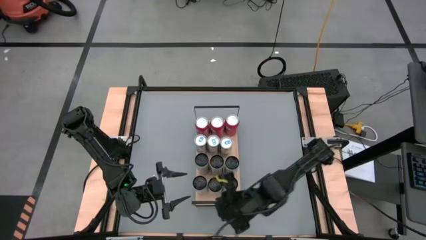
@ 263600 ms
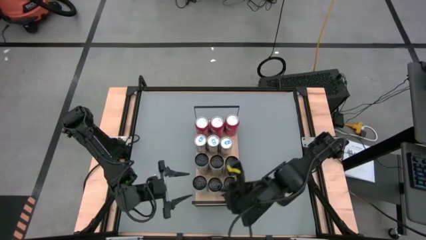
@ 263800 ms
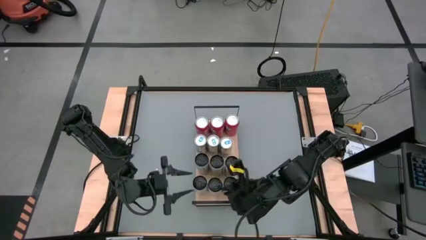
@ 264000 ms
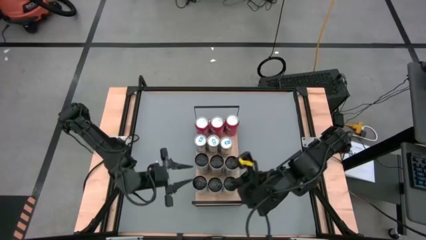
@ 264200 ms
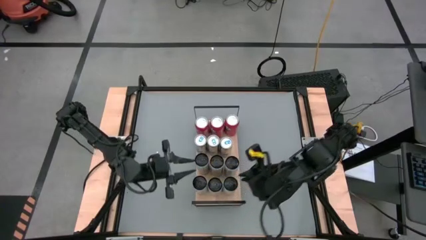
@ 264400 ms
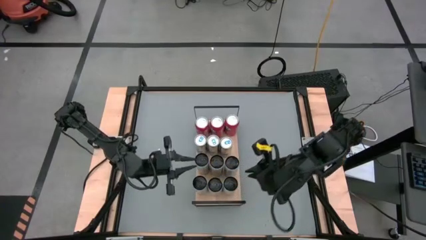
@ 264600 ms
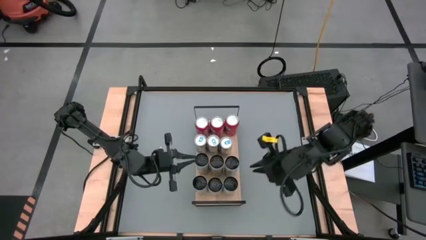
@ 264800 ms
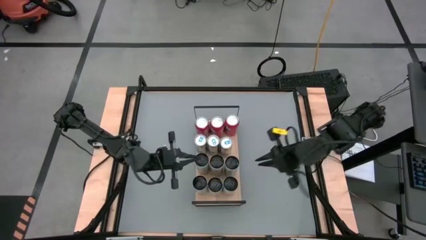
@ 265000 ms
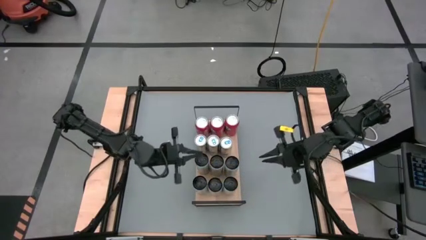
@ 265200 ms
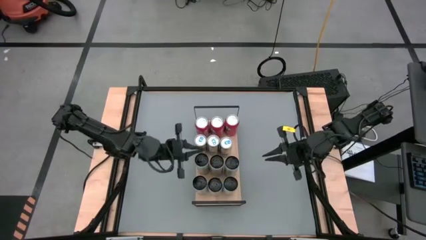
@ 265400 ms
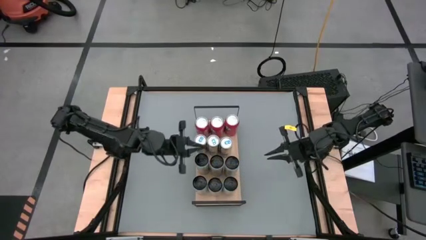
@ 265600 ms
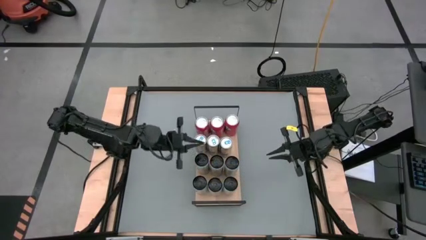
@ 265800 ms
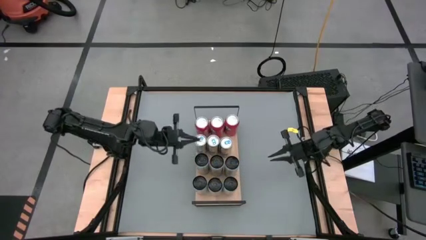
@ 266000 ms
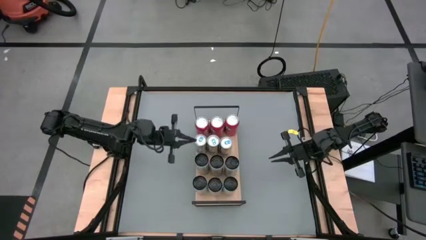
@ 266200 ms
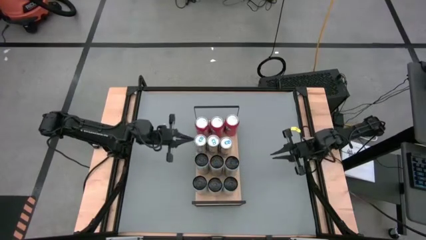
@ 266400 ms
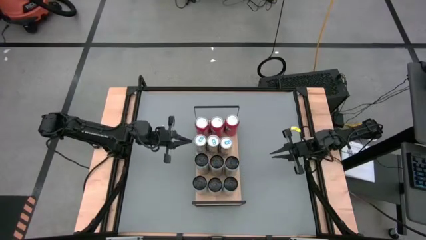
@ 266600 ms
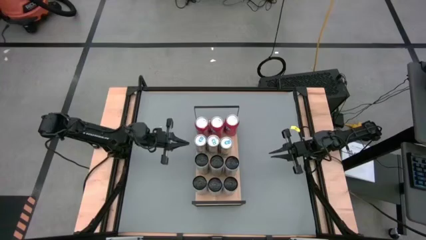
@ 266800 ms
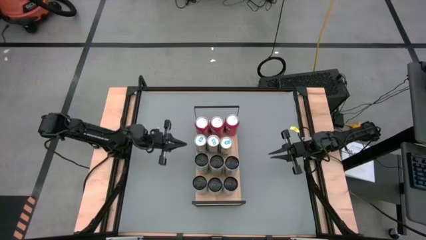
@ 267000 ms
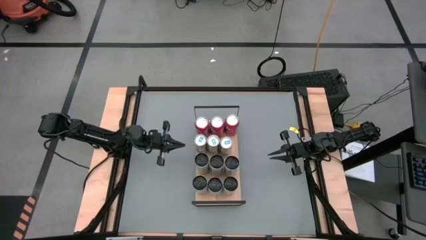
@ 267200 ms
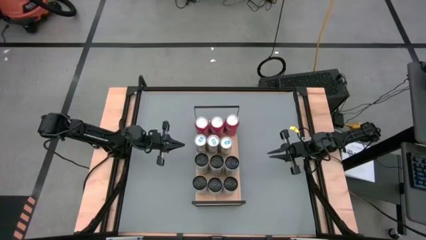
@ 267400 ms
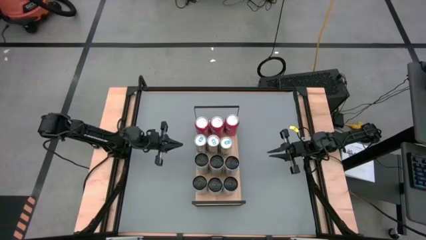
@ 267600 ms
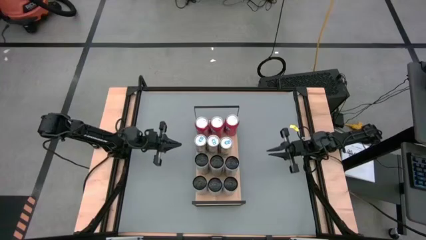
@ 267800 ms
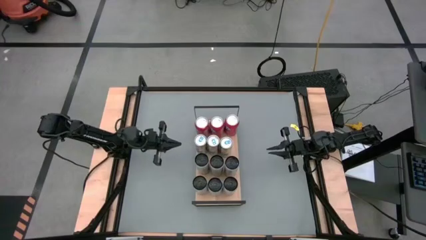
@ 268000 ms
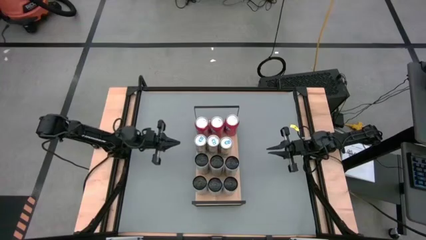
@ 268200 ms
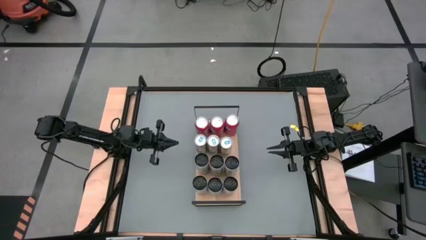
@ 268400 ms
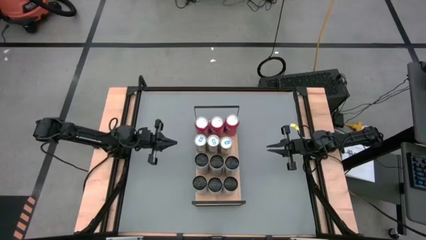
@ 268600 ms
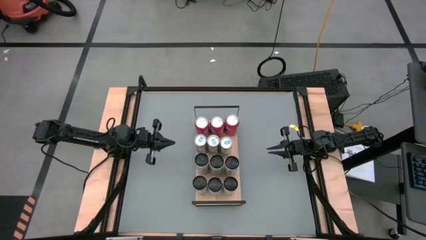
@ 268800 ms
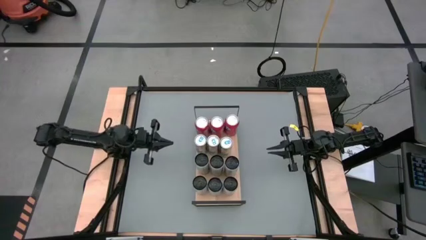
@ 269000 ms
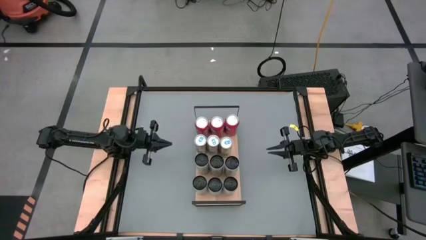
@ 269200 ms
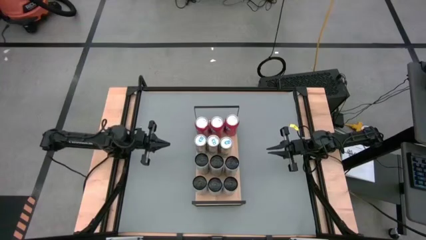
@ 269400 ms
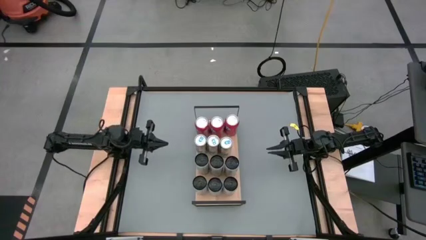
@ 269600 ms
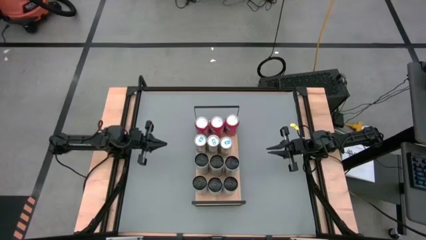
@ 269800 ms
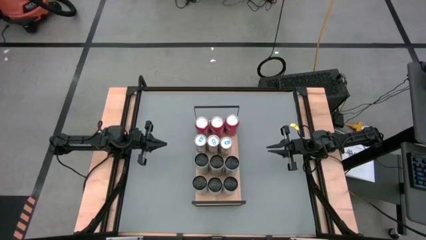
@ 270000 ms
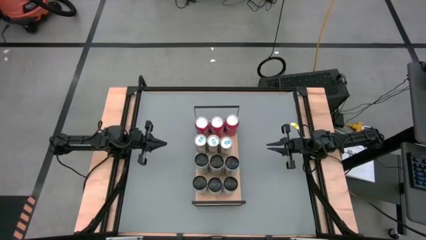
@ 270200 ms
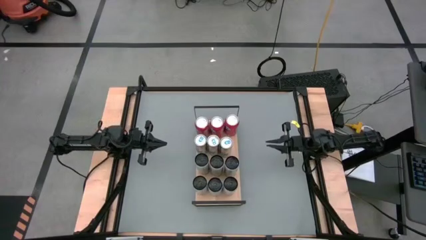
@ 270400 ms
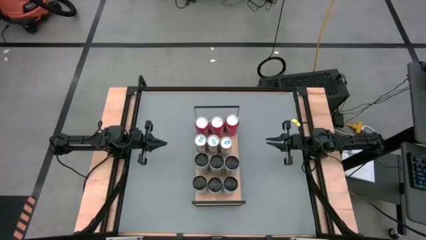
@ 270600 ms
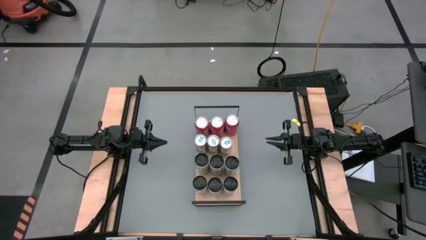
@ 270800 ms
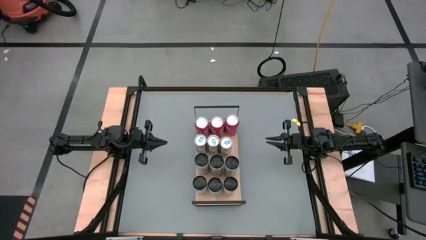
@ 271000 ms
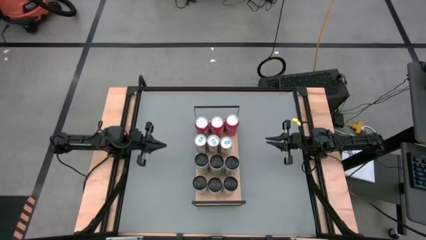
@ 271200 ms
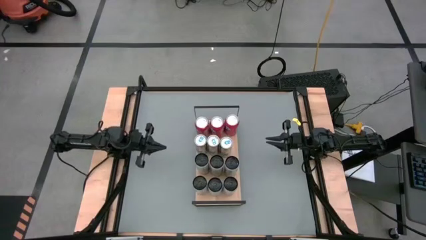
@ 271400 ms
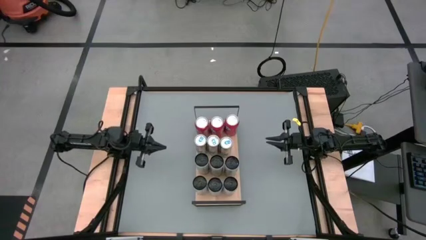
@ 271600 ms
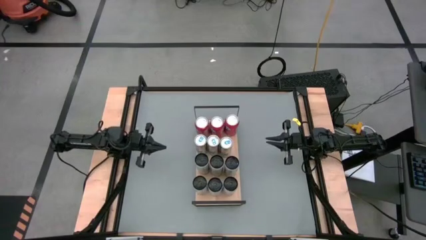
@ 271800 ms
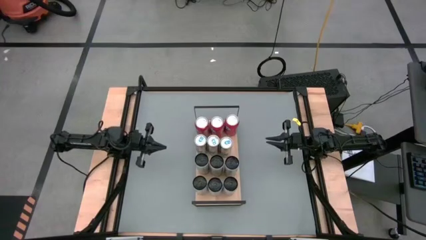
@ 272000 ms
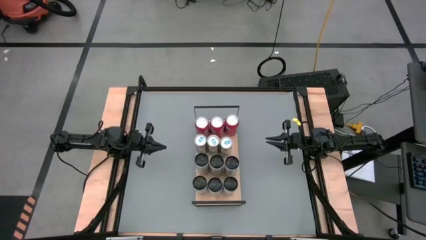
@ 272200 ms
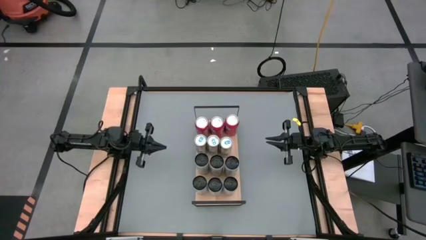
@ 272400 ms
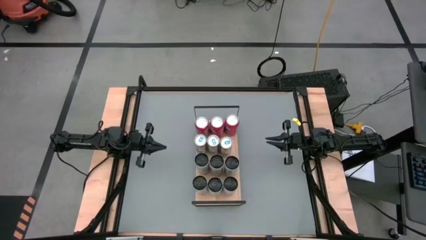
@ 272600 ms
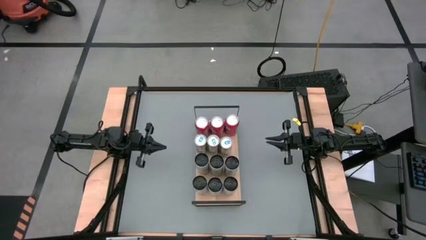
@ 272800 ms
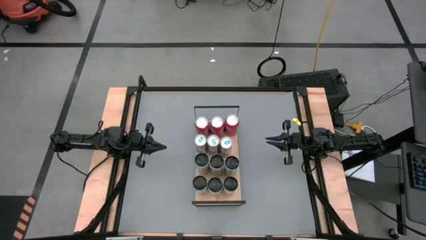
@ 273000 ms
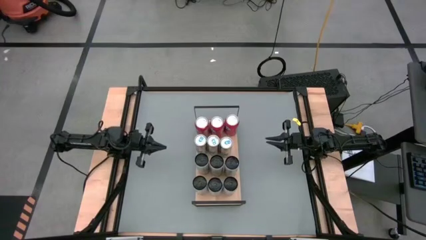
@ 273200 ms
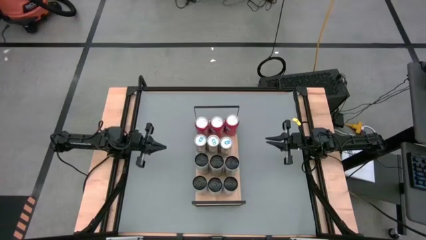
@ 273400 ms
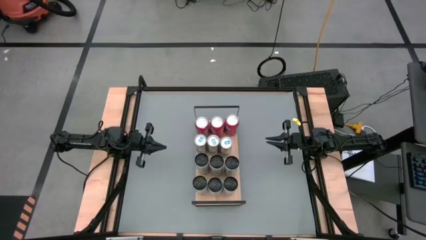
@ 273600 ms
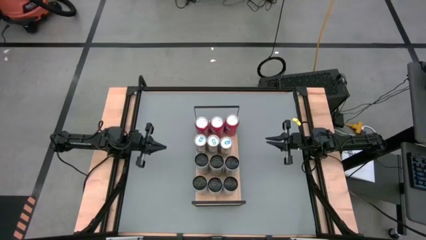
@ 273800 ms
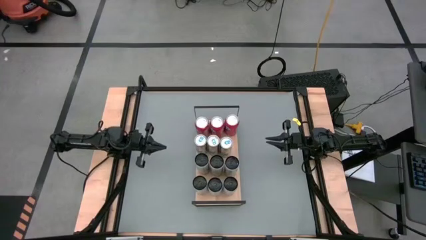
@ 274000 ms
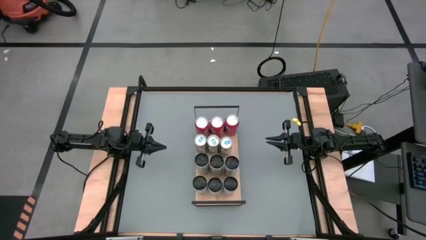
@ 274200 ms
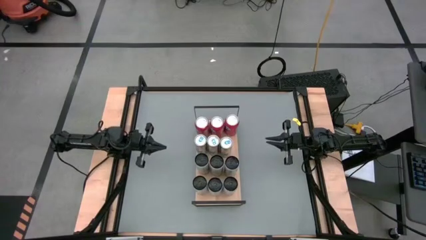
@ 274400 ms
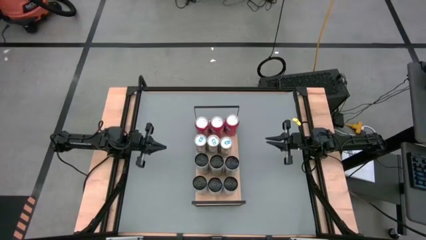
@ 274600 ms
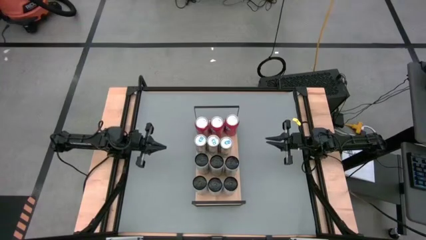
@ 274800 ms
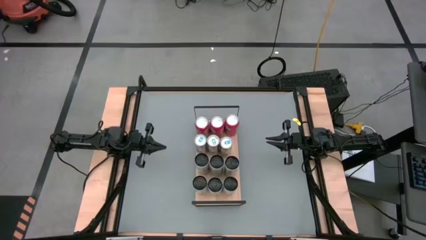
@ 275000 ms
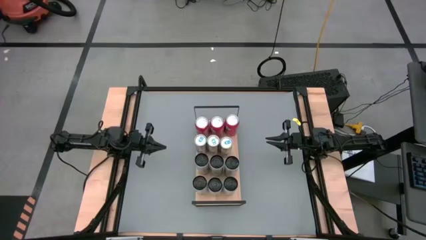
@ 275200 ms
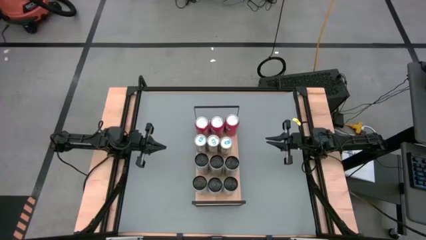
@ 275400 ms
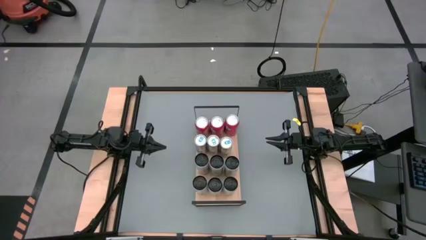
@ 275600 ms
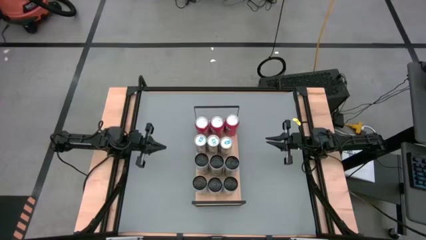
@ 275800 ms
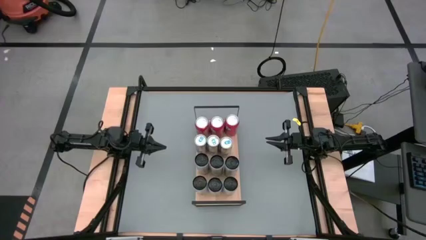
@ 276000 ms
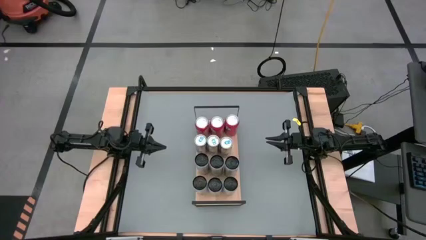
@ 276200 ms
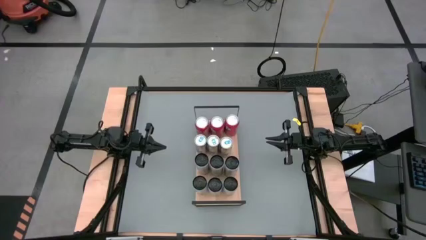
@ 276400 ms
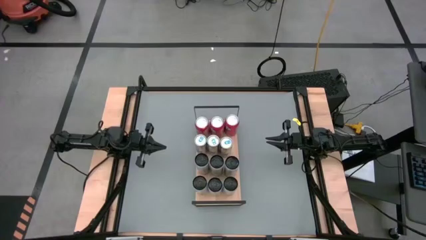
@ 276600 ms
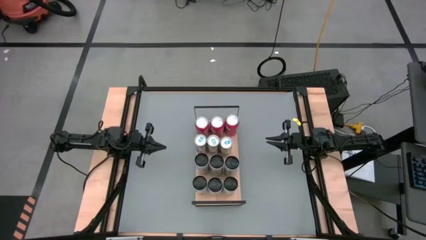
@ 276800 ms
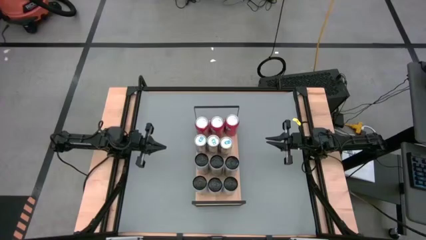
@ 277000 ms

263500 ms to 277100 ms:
Task: Place canned beverage on shelf
Return to Home Position
